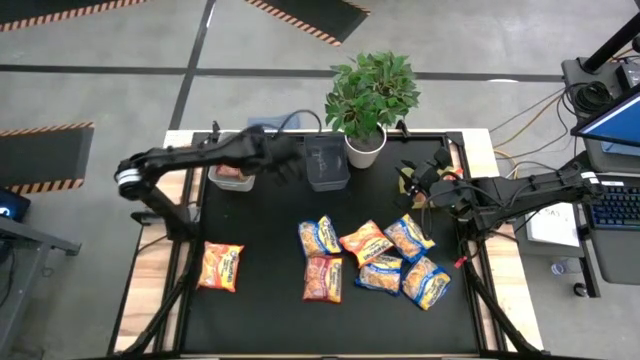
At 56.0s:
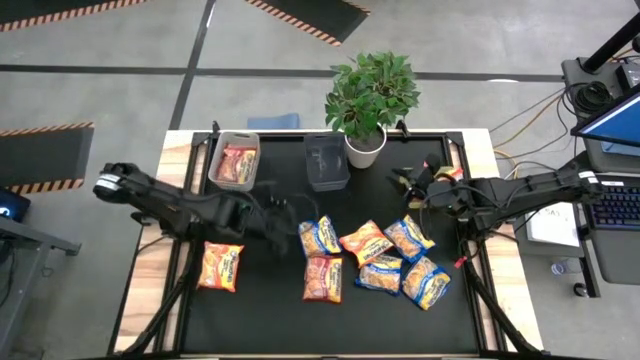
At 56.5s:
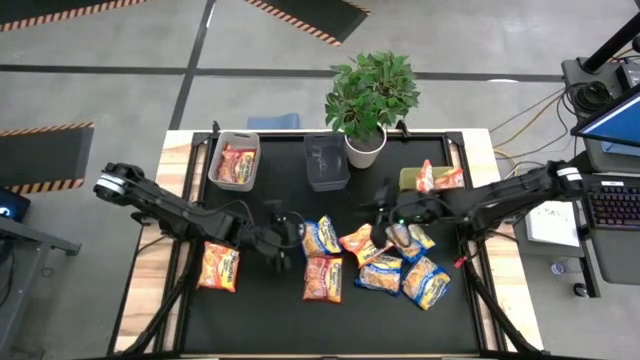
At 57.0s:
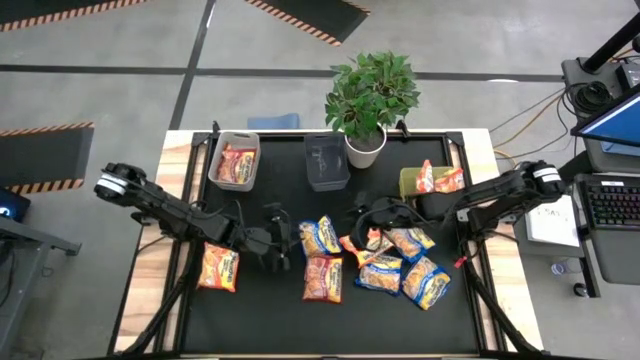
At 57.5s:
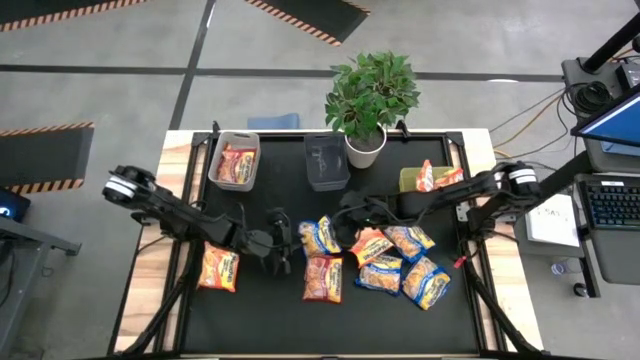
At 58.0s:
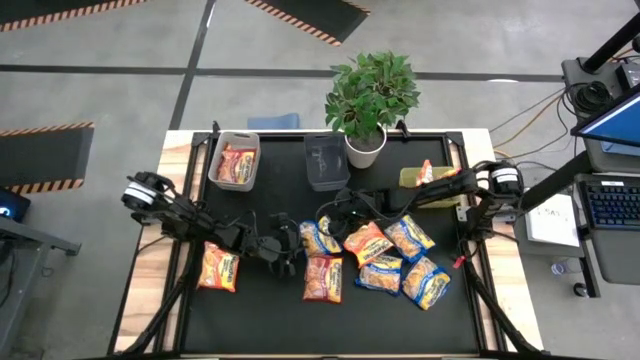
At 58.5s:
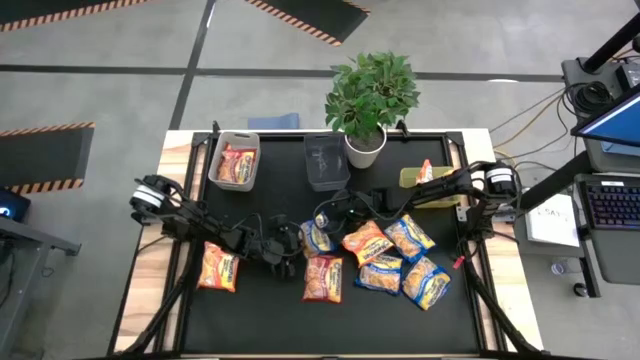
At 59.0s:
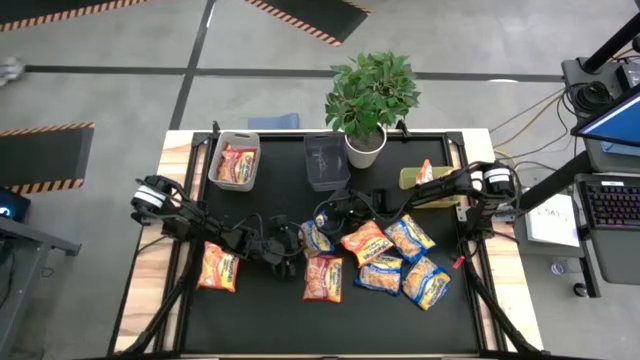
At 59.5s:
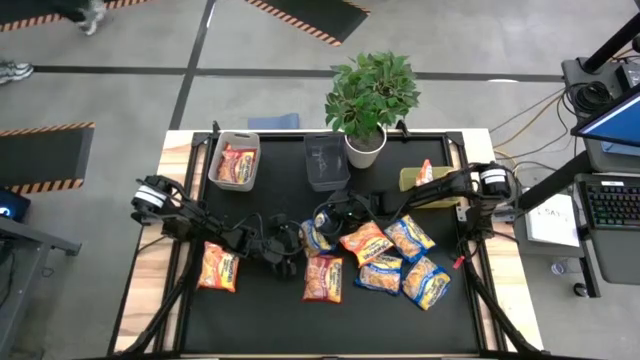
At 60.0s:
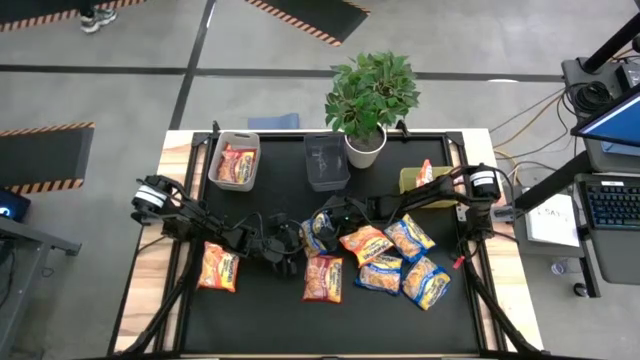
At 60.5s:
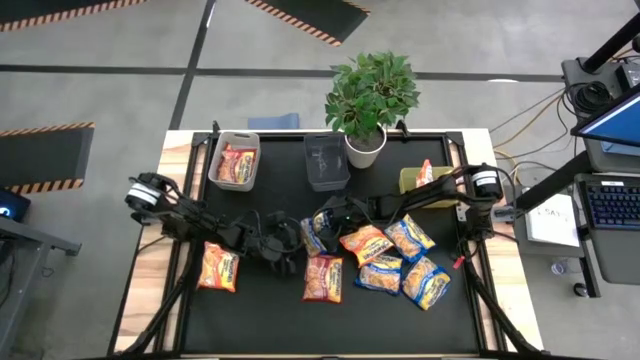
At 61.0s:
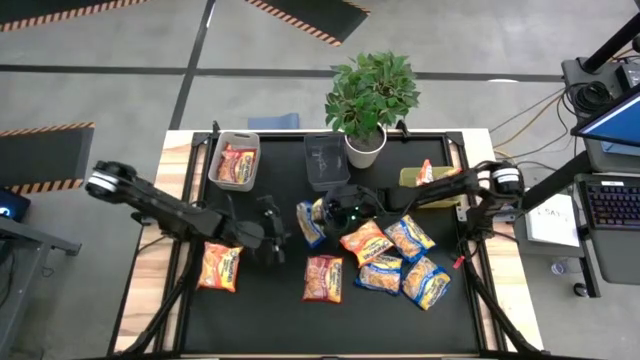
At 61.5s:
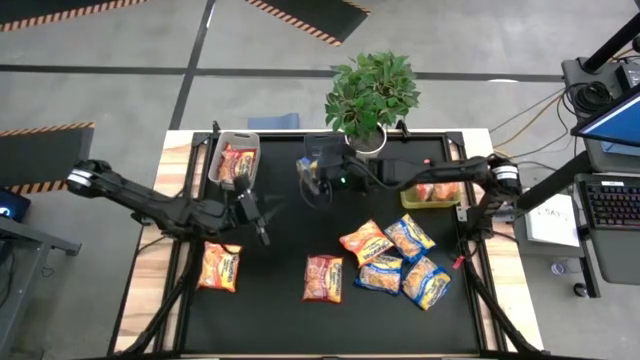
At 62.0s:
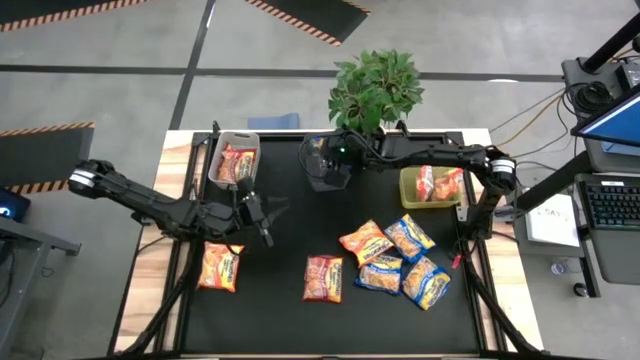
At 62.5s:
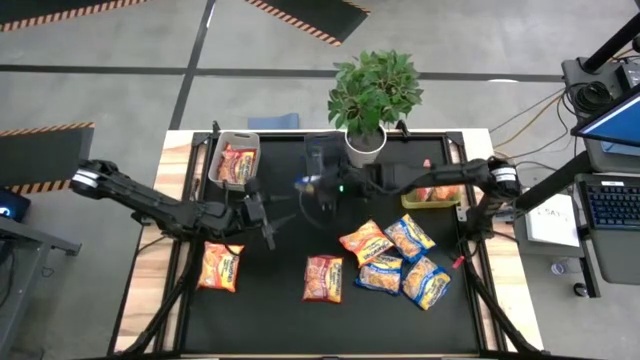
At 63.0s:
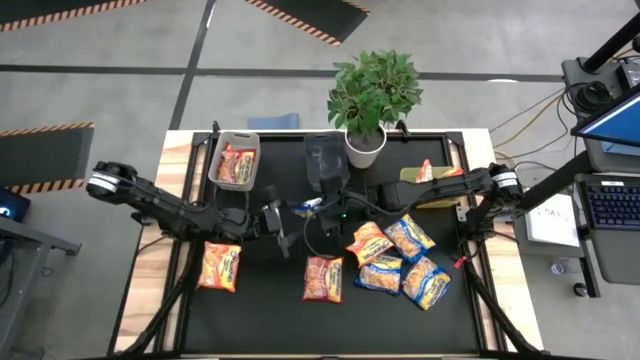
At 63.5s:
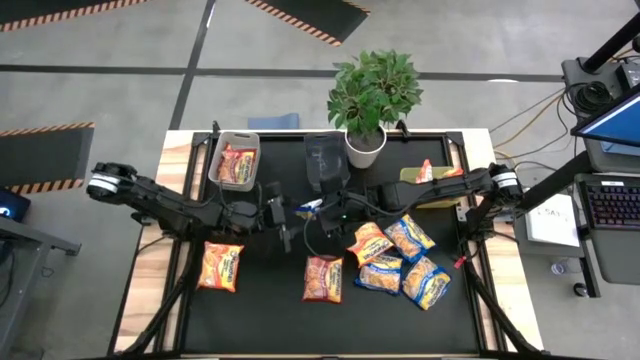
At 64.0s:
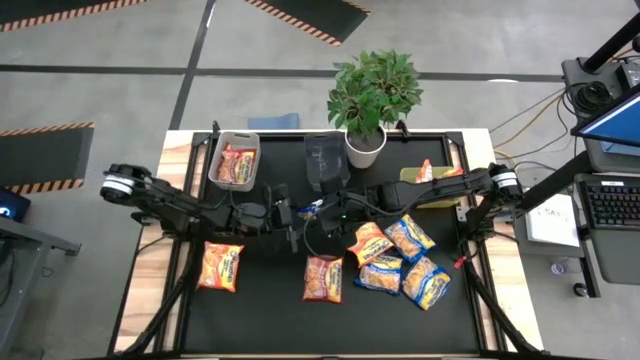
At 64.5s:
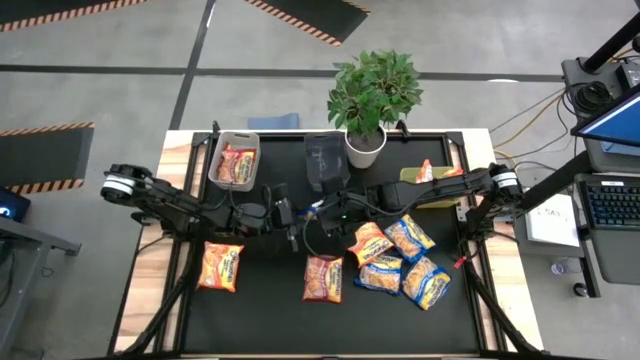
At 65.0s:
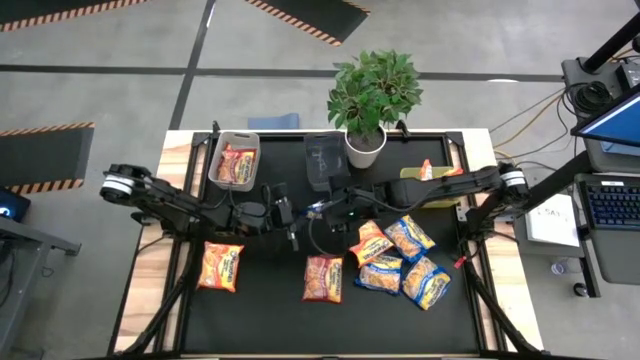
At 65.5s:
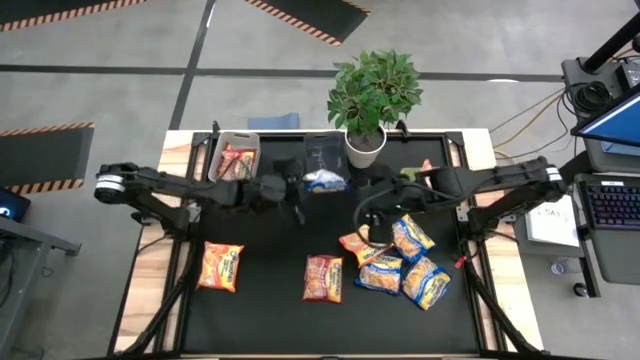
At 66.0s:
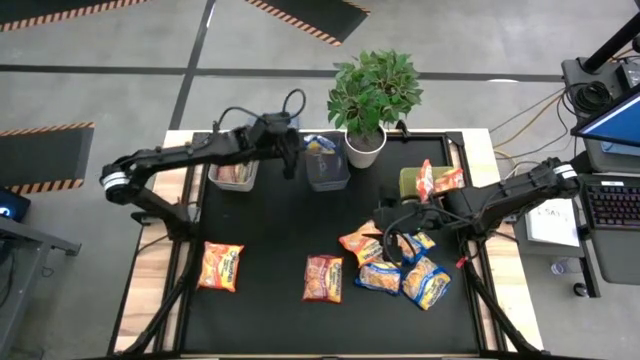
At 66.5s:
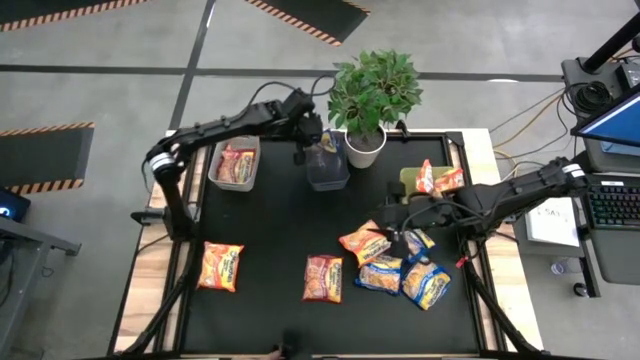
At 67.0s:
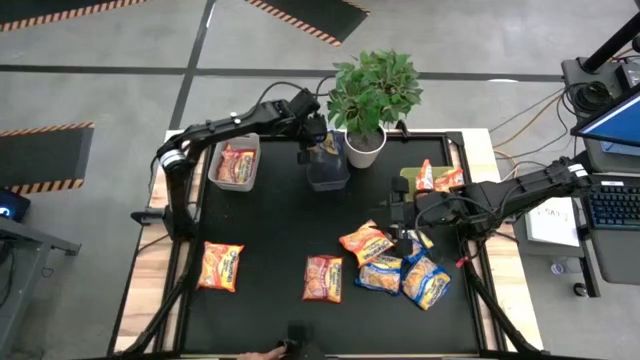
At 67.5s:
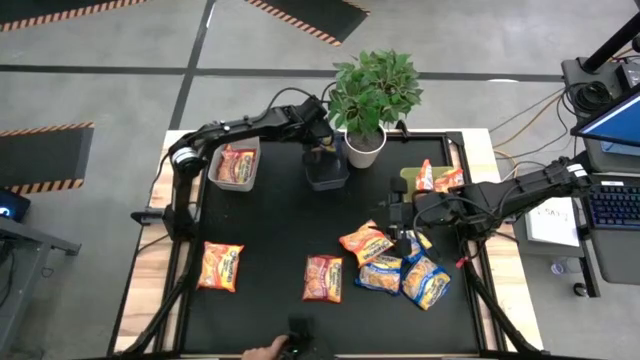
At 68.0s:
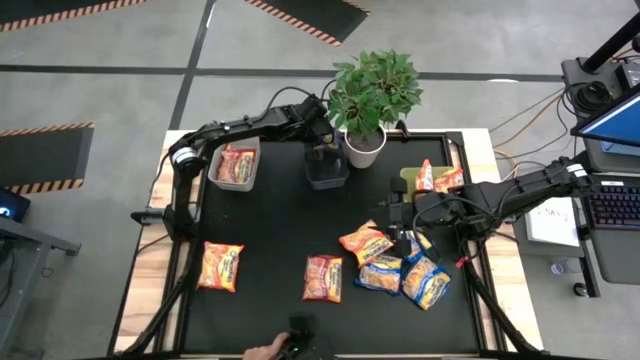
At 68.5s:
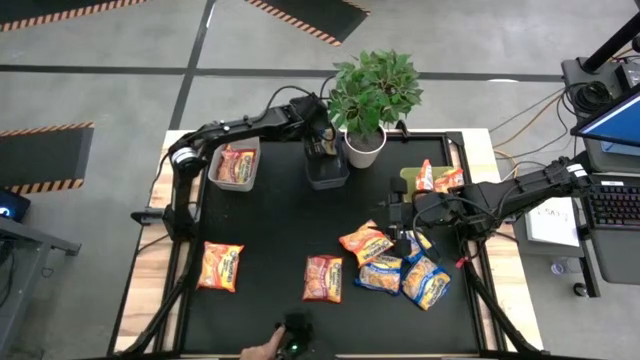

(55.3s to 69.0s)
Task: Sort Maruchan noodles
Put the blue noodle pack into the black bin

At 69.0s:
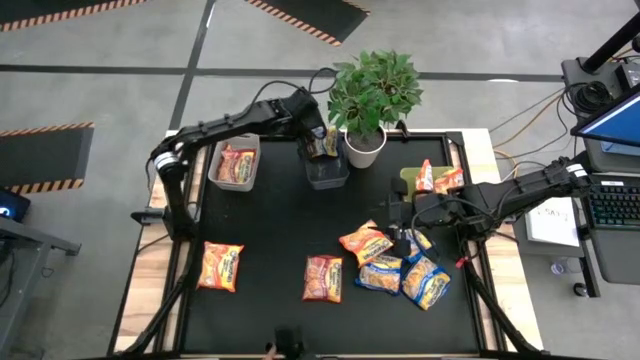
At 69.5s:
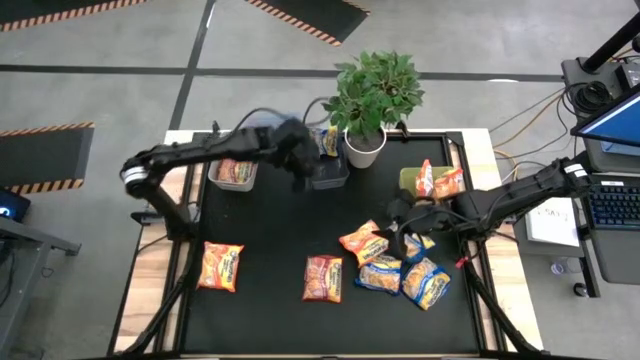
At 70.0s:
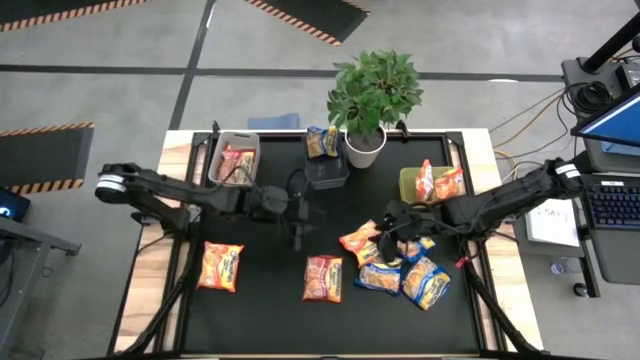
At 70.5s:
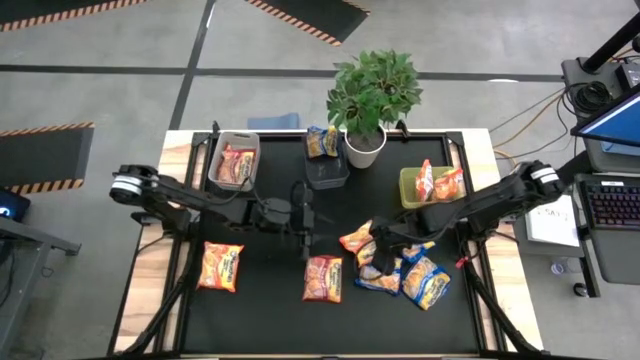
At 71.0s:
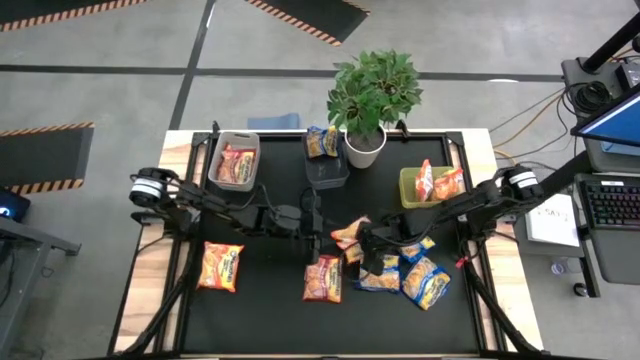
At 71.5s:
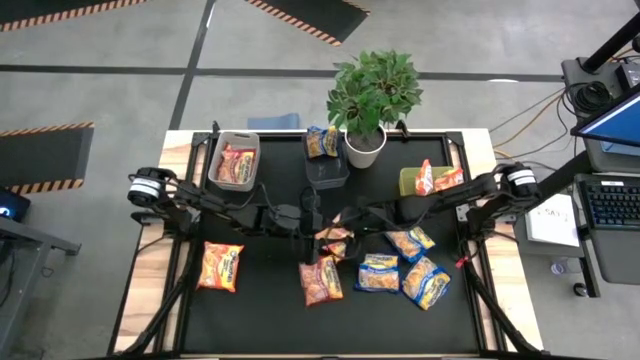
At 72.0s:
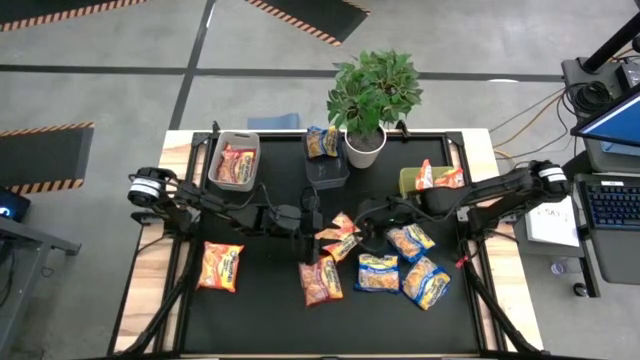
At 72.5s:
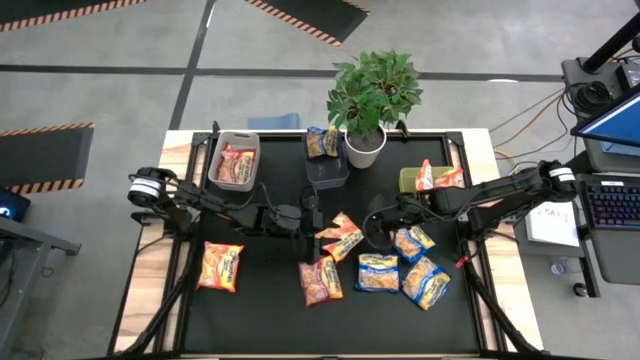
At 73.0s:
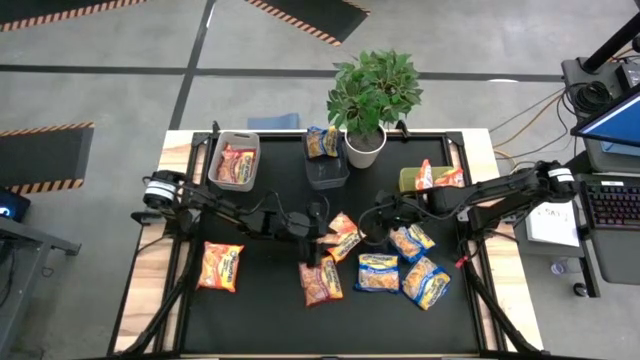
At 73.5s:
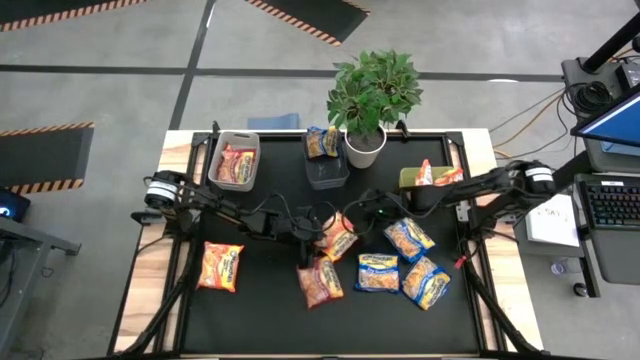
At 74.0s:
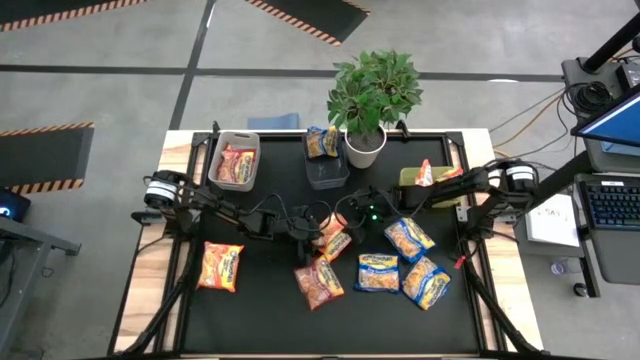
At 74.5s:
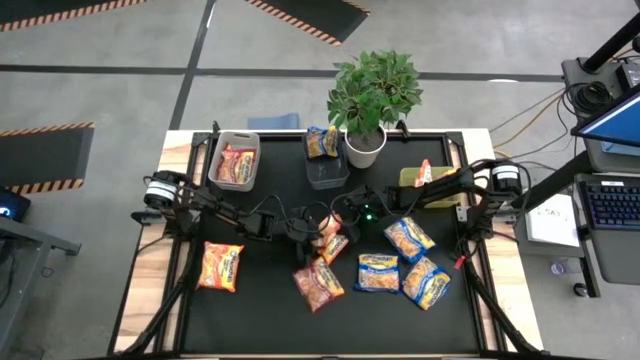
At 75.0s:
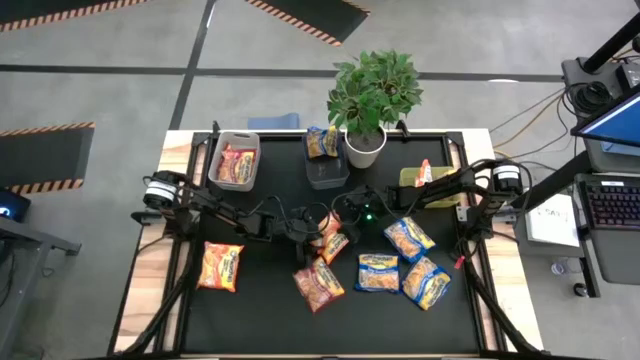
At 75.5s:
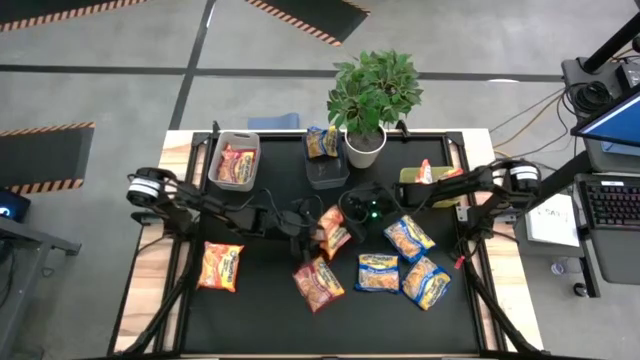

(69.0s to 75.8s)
Put the orange noodle pack into the yellow bin
